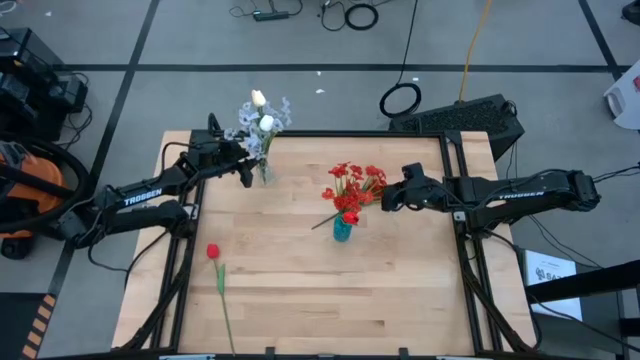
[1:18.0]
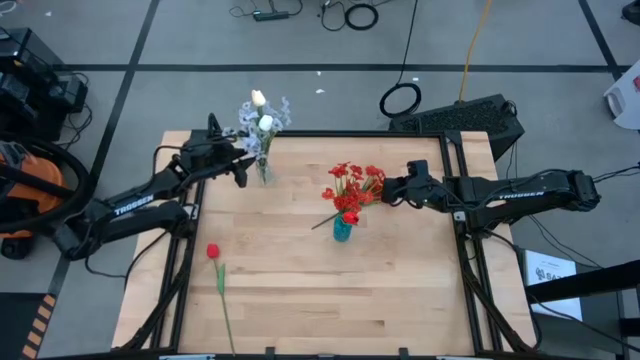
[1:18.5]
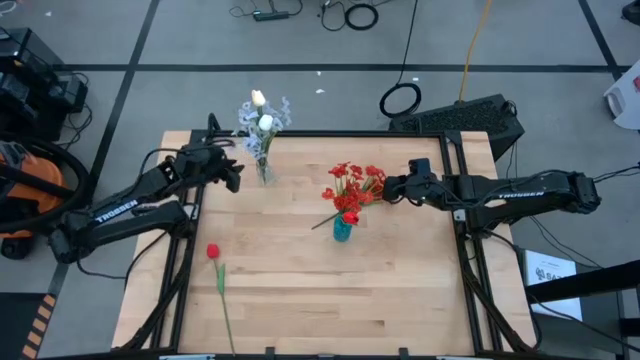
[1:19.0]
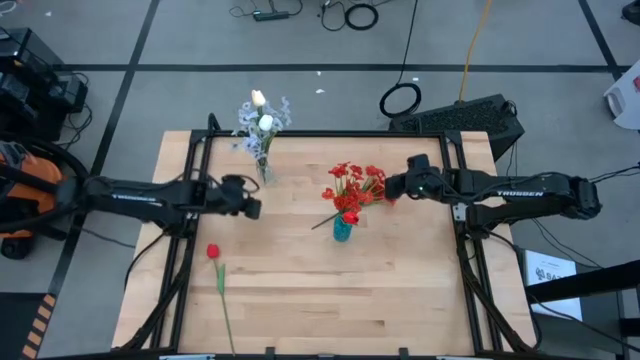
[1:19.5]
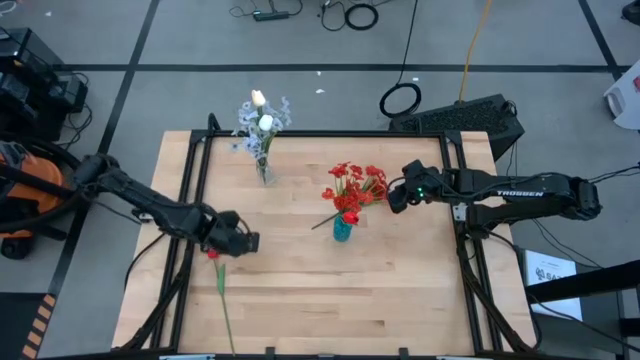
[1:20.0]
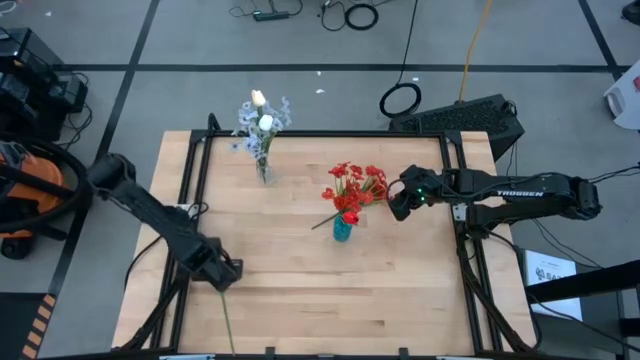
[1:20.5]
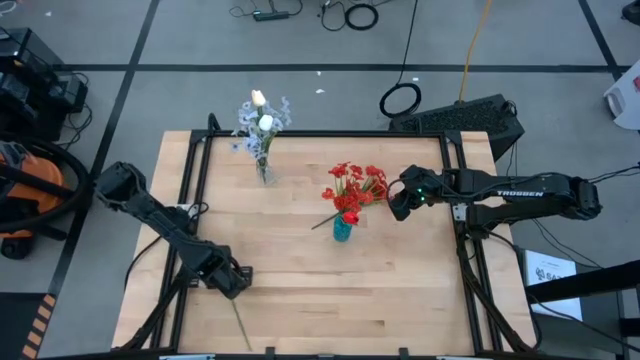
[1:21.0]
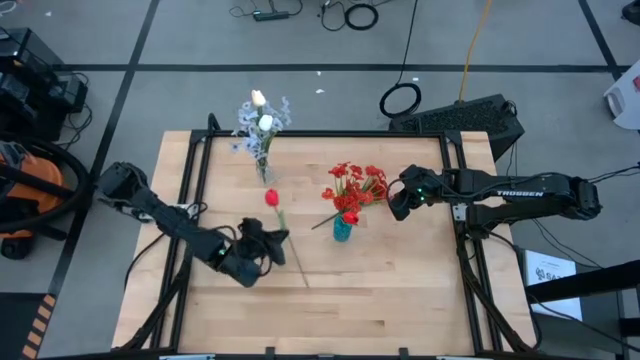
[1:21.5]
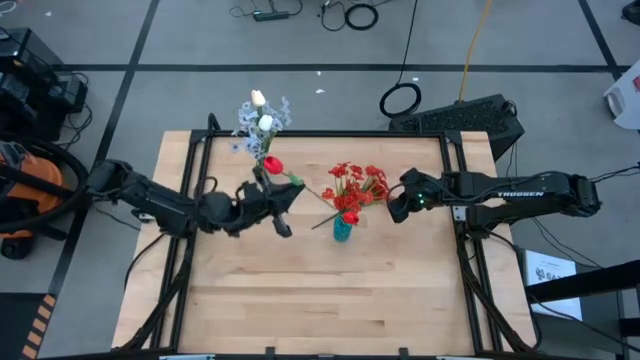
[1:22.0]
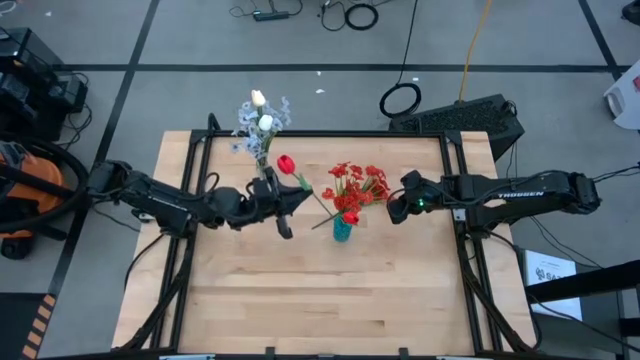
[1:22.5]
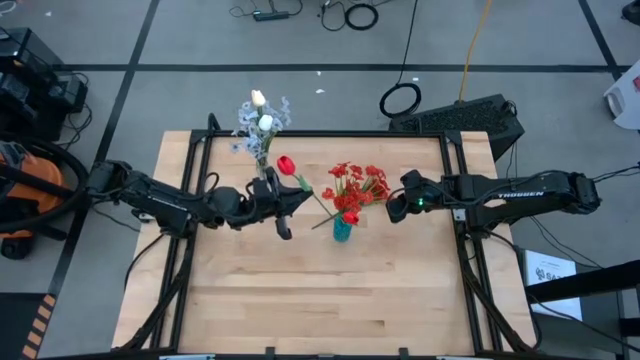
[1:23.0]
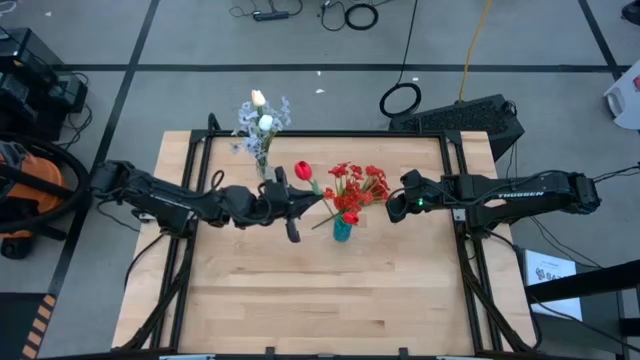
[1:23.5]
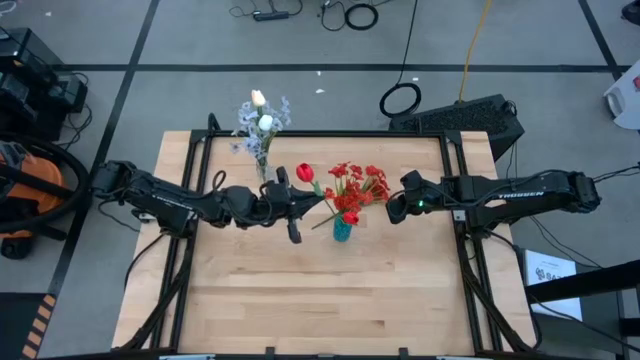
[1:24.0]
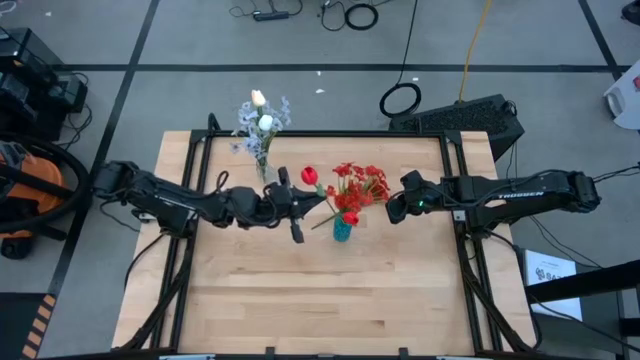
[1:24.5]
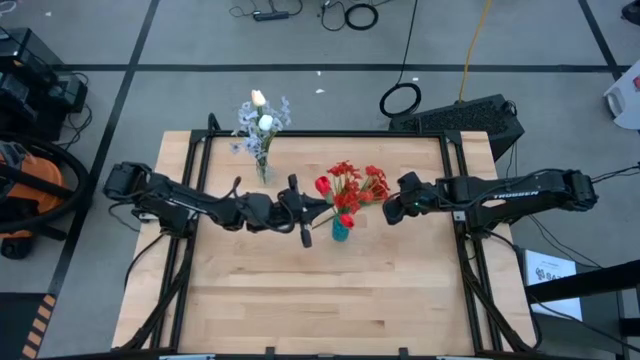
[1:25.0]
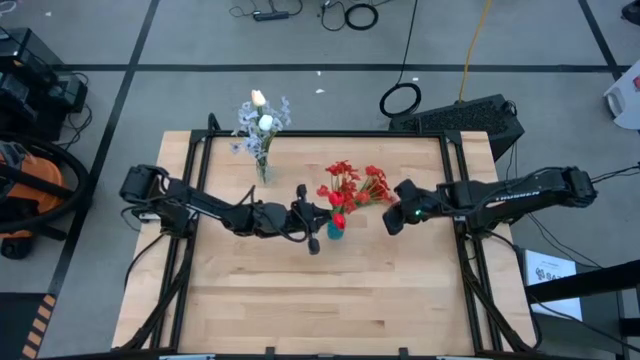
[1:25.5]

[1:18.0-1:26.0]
Task: Sort flowers into vase by color
Put the red tulip into the blue vase

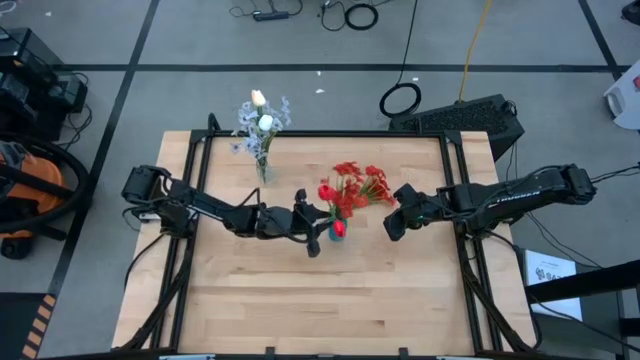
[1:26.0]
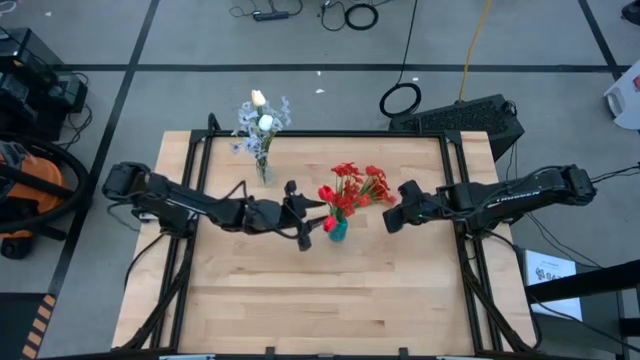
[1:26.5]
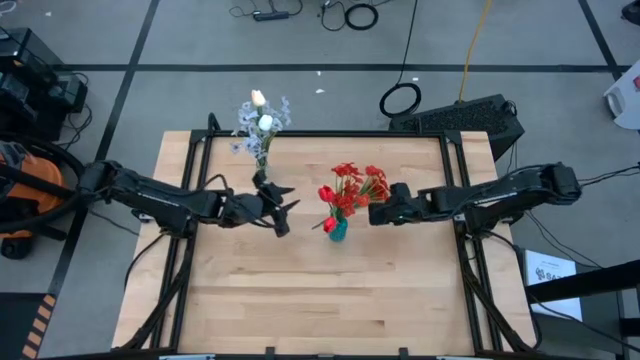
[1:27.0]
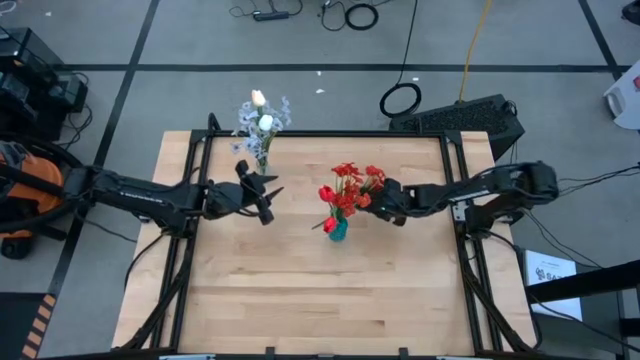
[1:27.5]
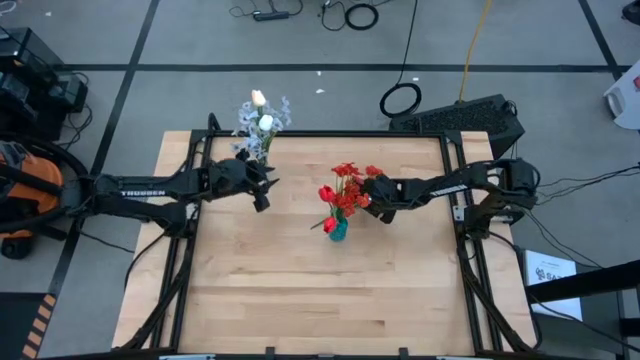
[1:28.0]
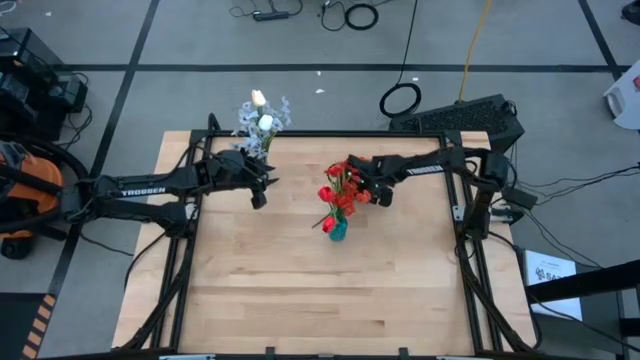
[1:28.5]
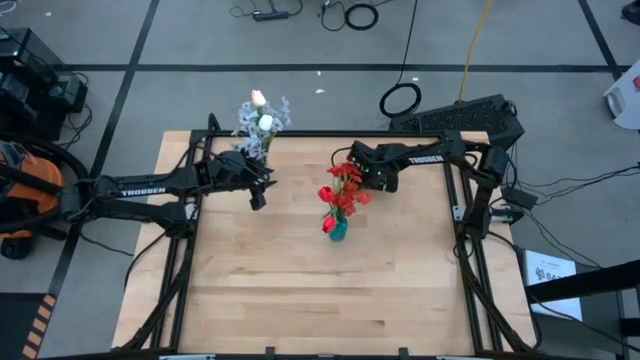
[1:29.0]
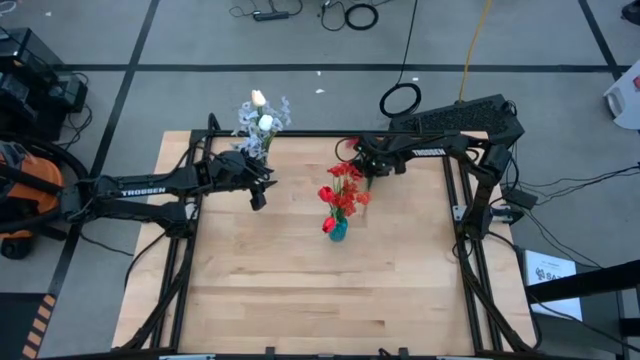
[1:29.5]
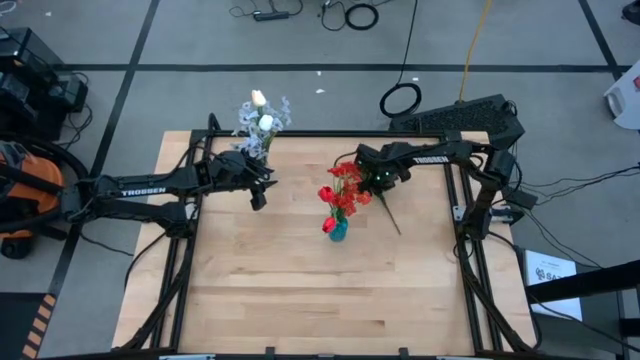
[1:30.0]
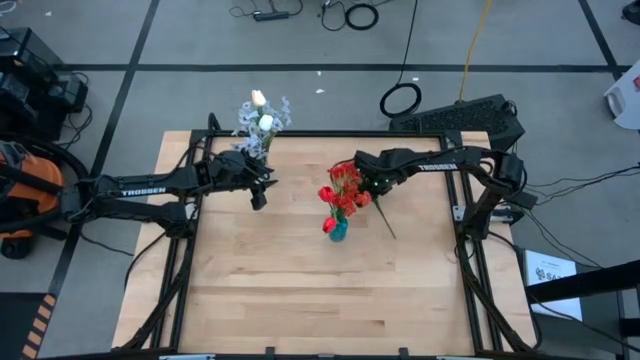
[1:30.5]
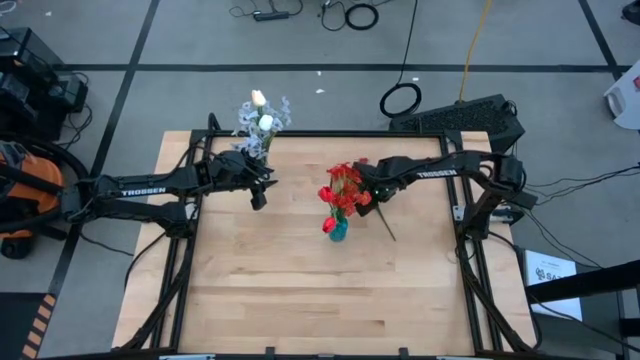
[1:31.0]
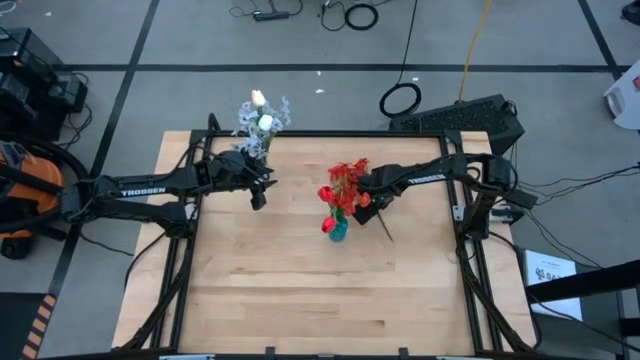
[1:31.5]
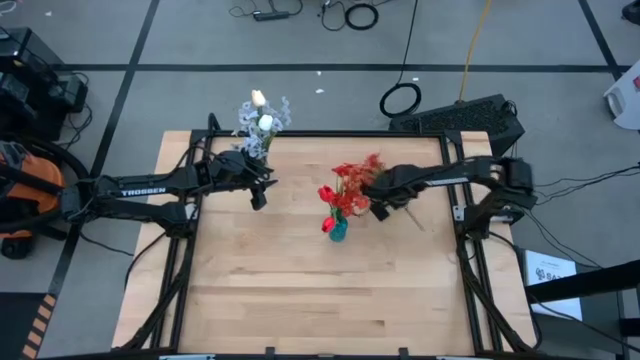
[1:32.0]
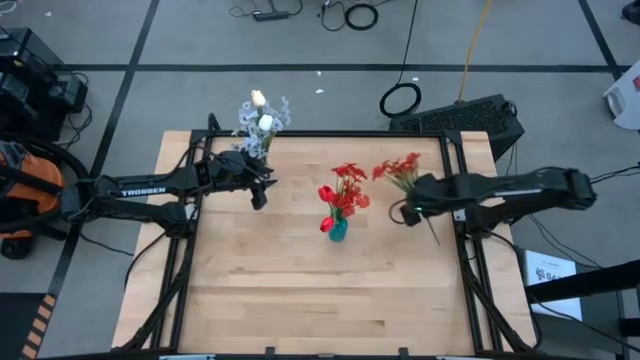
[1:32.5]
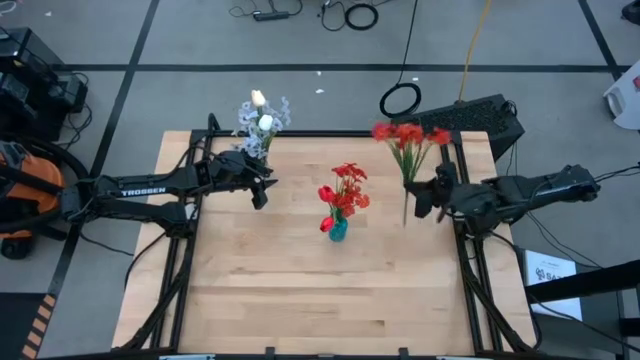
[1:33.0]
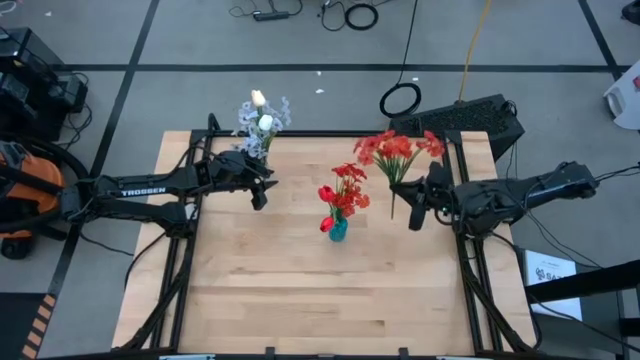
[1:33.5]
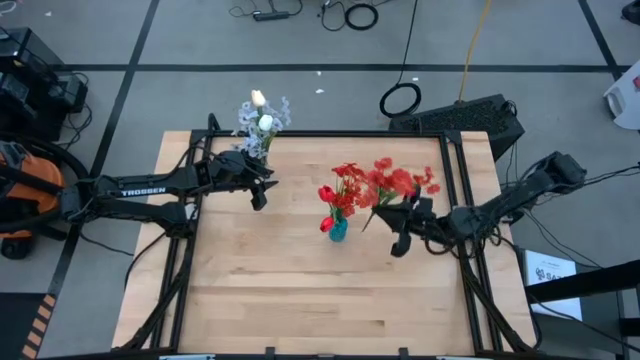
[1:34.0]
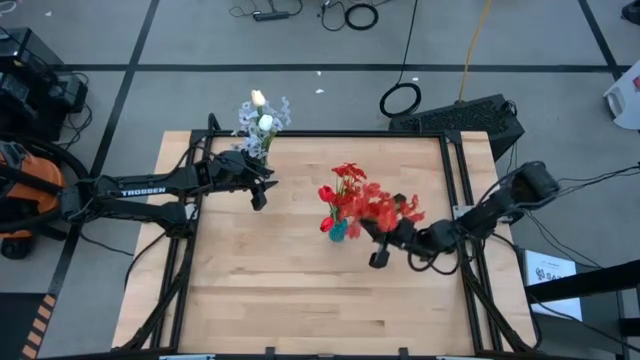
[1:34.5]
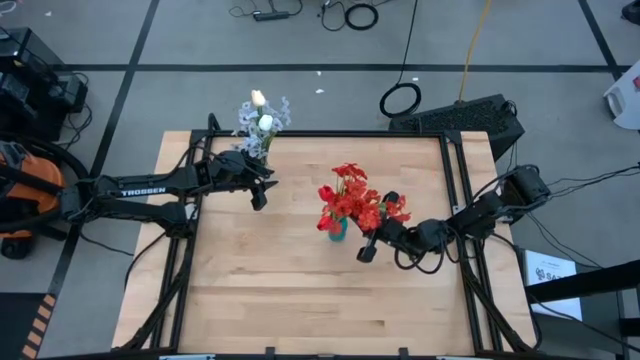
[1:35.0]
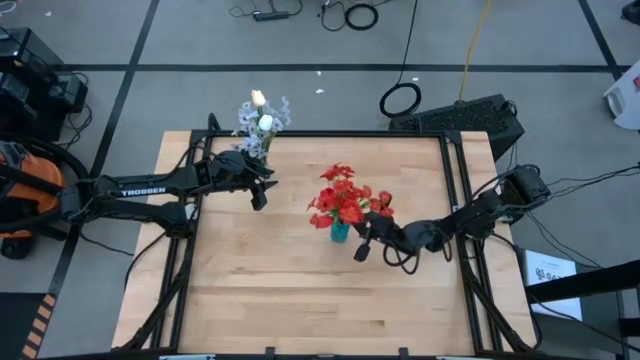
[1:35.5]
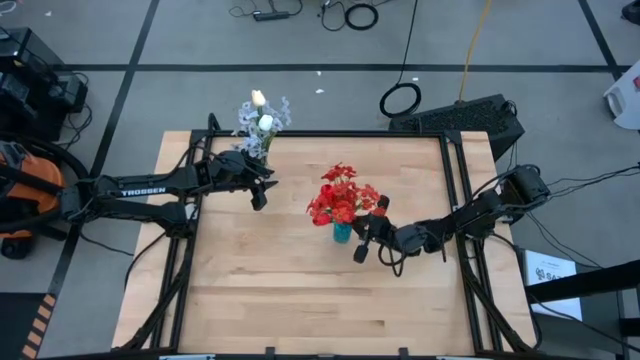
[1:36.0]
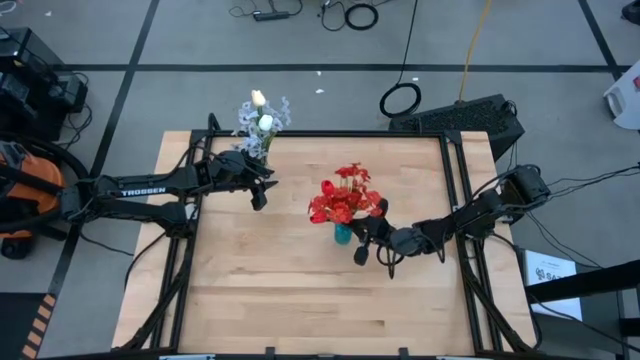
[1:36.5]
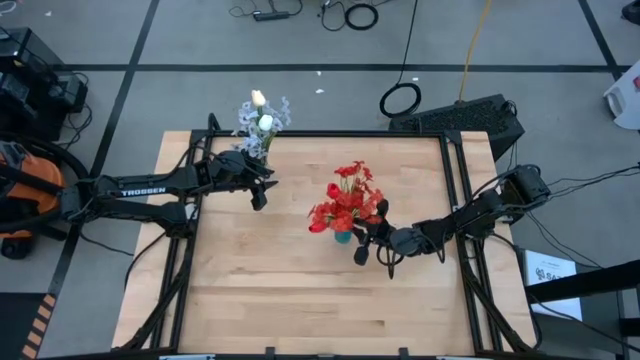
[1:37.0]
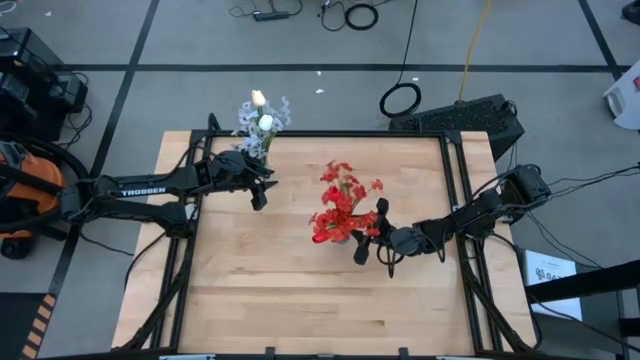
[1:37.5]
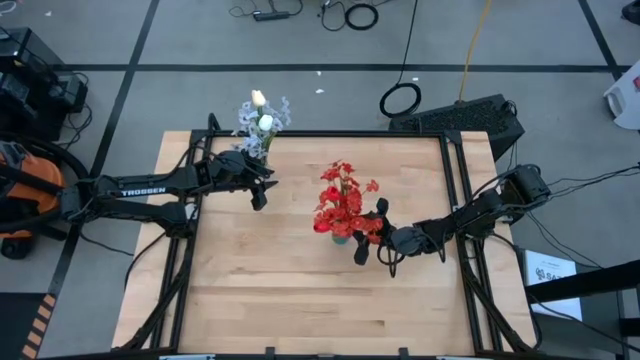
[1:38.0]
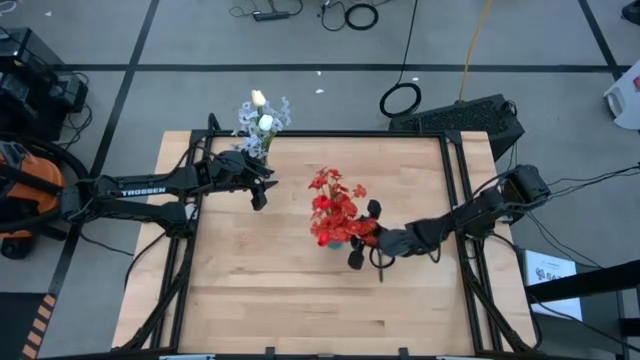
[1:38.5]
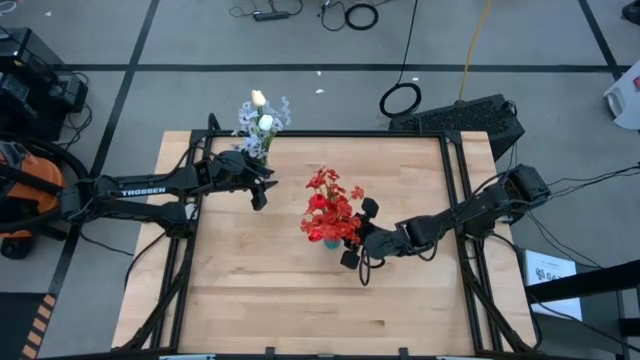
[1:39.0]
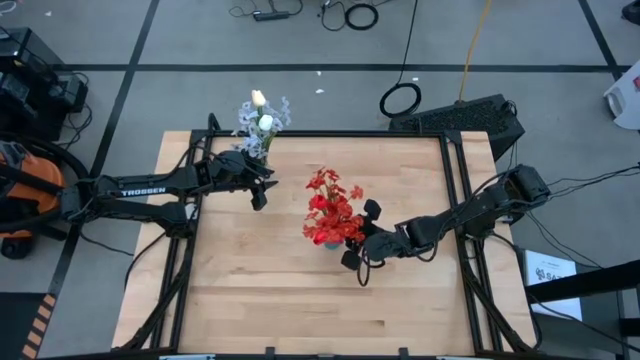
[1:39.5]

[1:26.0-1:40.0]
Put the red poppies into the blue vase
